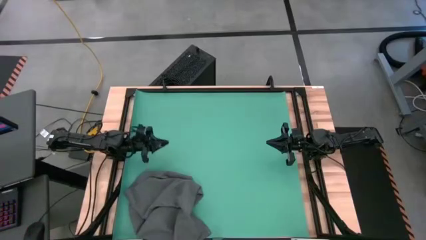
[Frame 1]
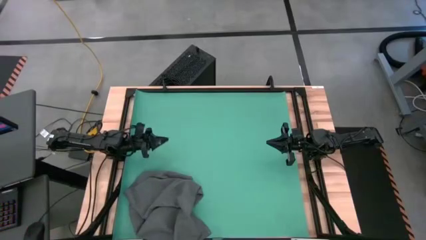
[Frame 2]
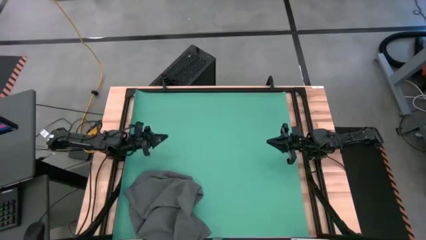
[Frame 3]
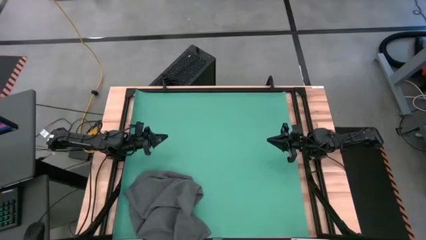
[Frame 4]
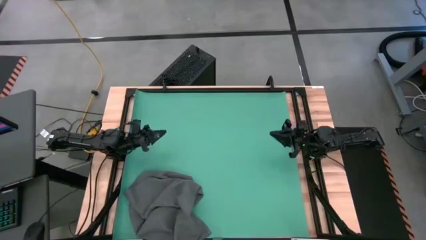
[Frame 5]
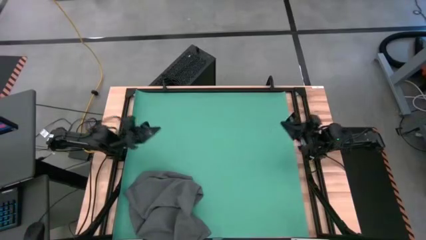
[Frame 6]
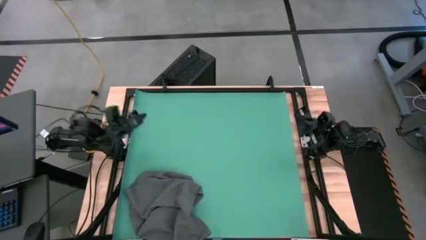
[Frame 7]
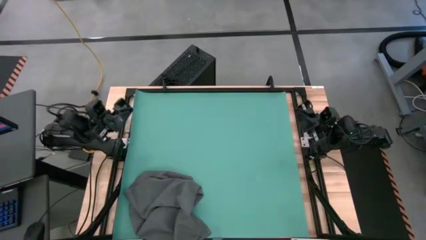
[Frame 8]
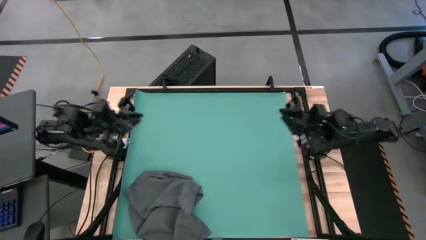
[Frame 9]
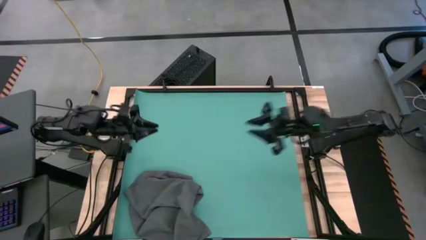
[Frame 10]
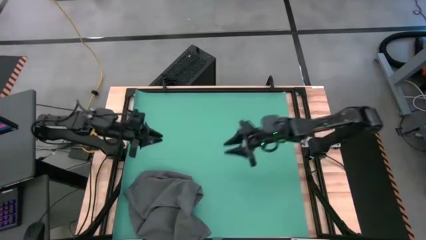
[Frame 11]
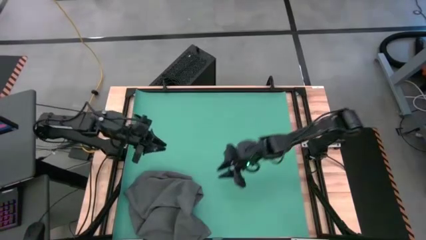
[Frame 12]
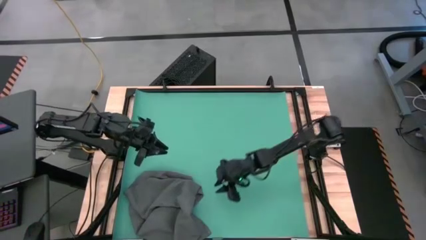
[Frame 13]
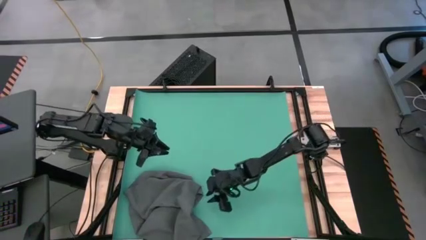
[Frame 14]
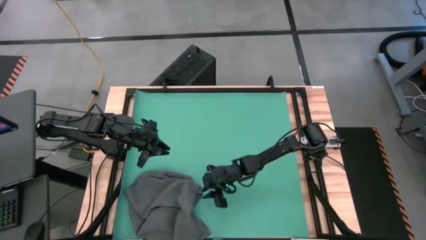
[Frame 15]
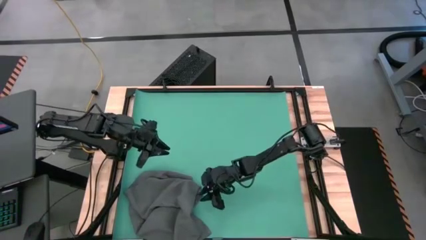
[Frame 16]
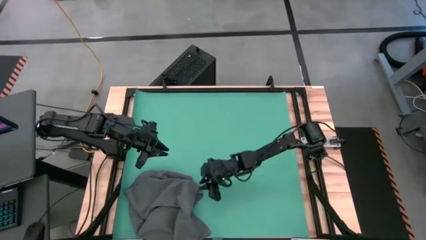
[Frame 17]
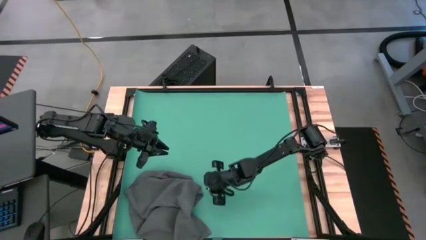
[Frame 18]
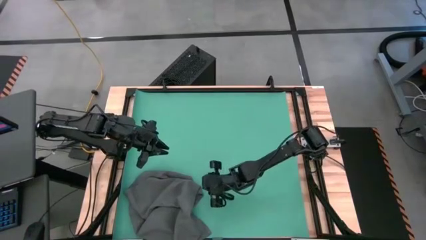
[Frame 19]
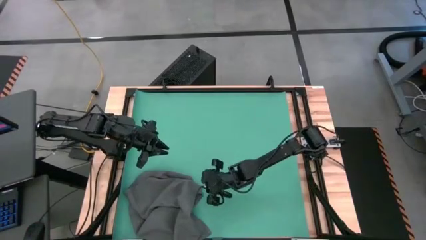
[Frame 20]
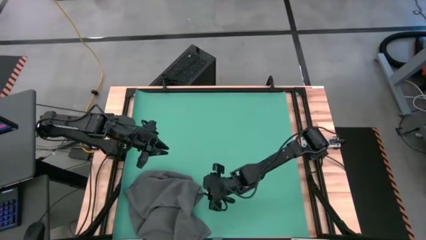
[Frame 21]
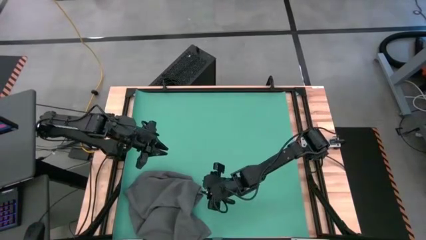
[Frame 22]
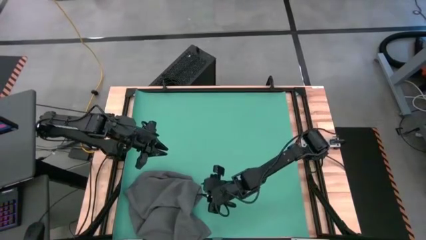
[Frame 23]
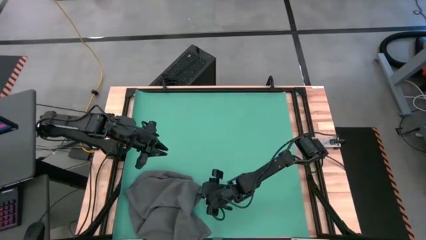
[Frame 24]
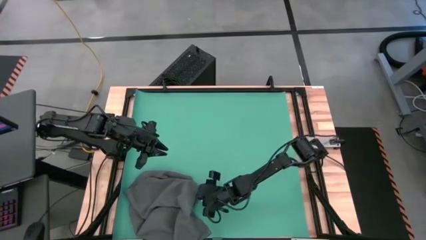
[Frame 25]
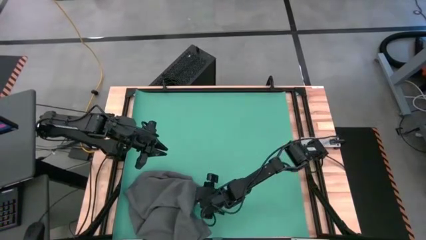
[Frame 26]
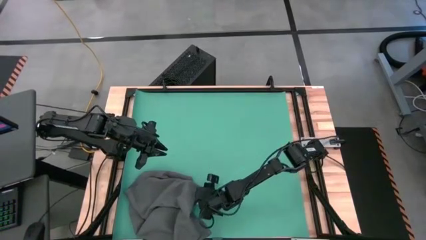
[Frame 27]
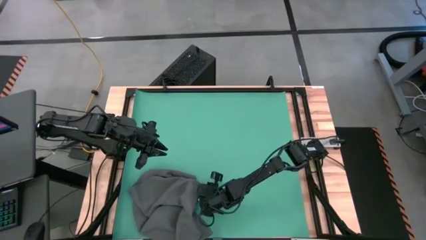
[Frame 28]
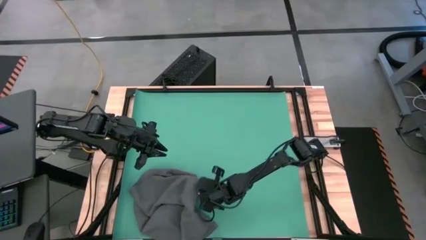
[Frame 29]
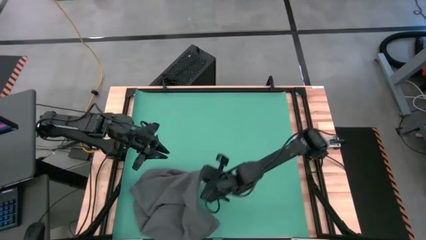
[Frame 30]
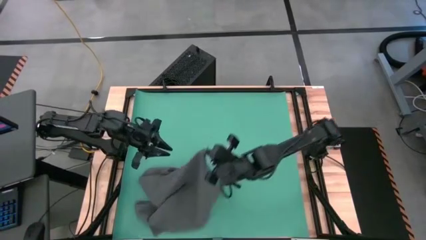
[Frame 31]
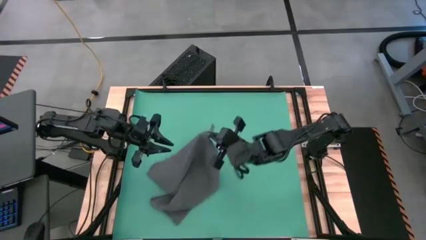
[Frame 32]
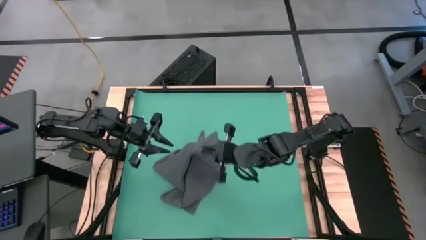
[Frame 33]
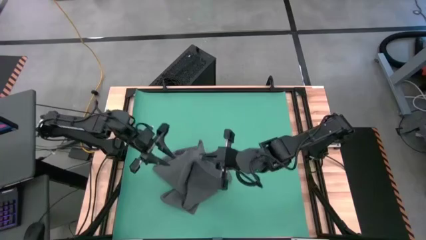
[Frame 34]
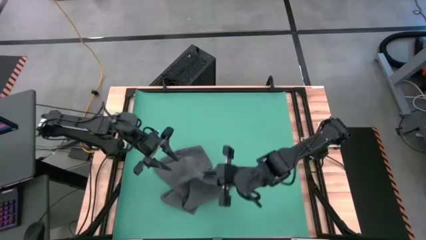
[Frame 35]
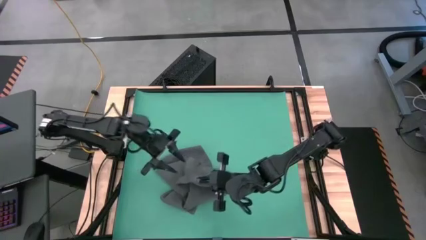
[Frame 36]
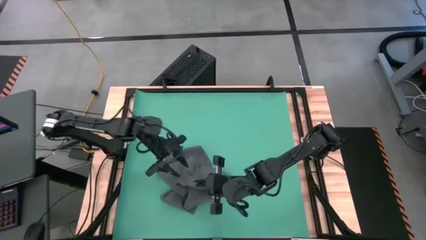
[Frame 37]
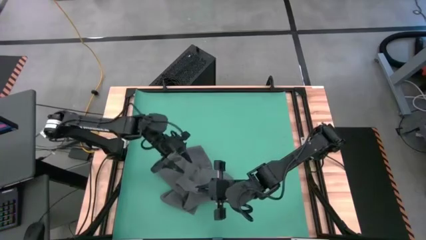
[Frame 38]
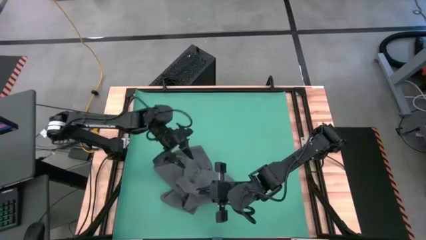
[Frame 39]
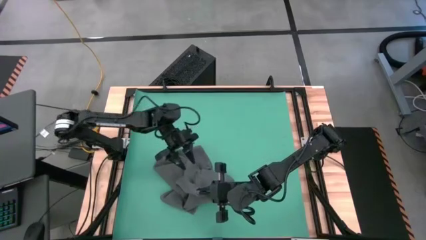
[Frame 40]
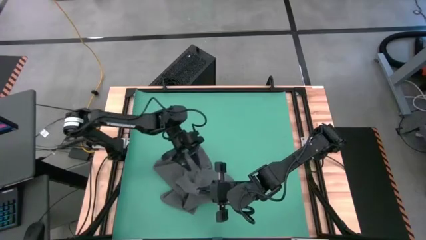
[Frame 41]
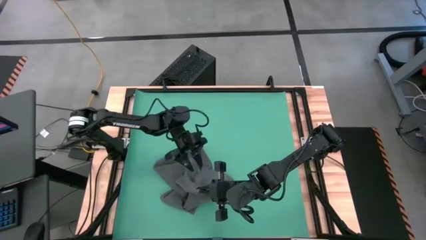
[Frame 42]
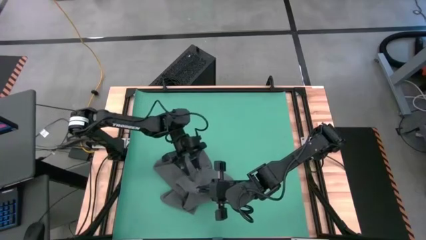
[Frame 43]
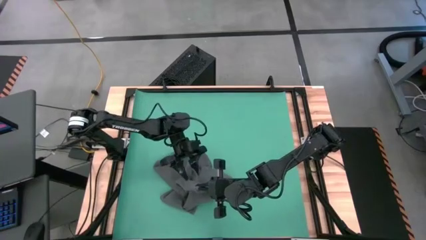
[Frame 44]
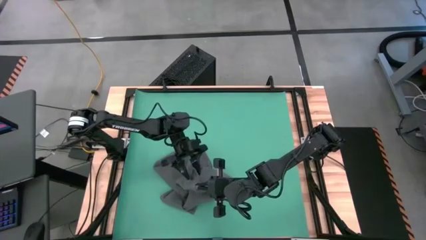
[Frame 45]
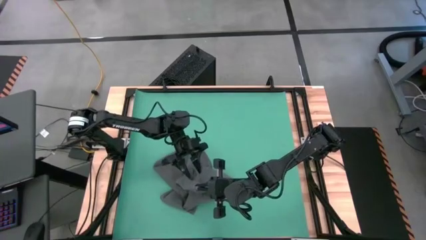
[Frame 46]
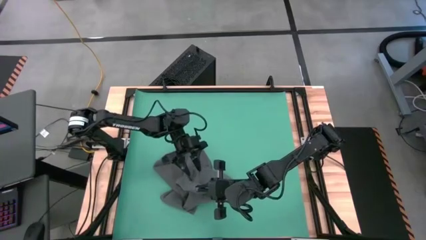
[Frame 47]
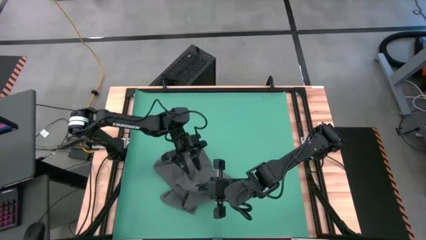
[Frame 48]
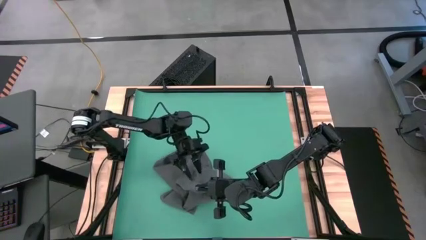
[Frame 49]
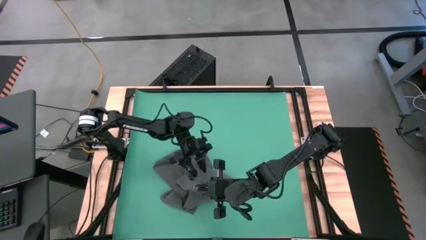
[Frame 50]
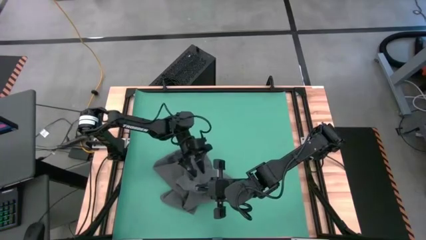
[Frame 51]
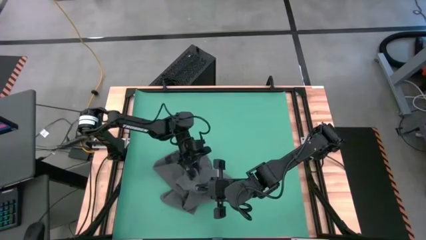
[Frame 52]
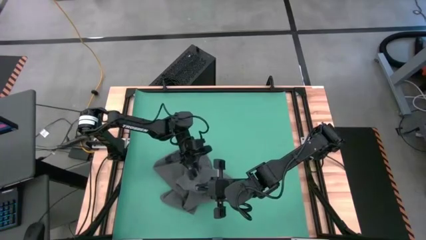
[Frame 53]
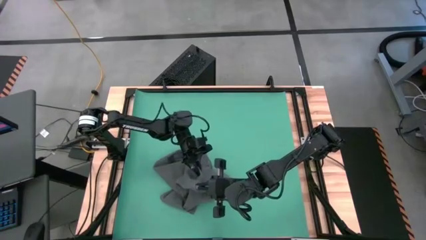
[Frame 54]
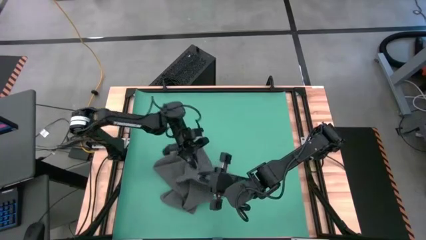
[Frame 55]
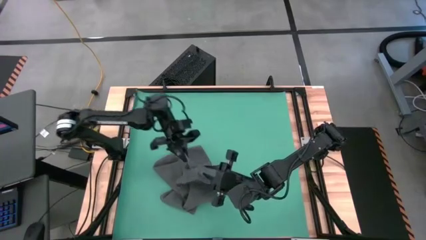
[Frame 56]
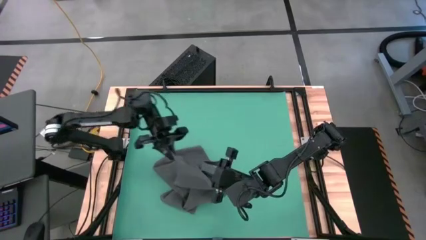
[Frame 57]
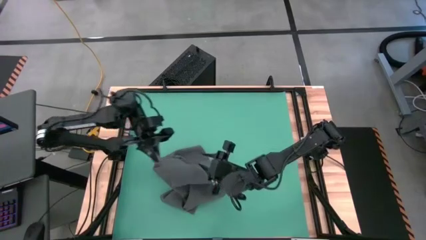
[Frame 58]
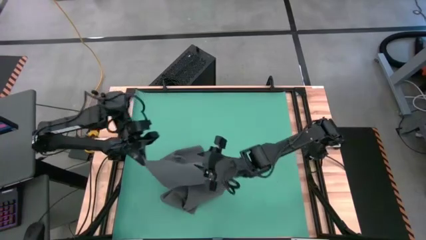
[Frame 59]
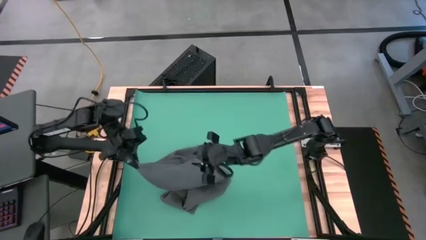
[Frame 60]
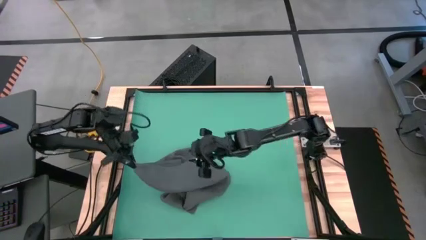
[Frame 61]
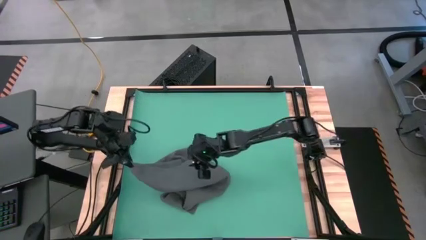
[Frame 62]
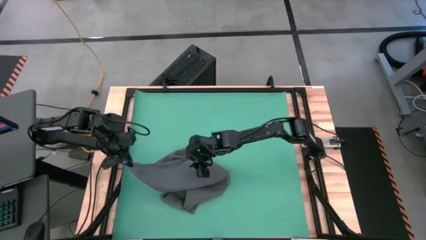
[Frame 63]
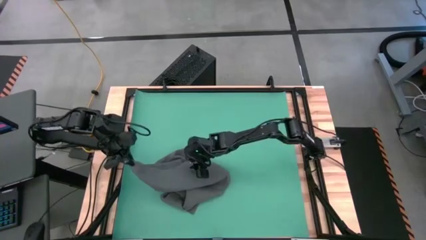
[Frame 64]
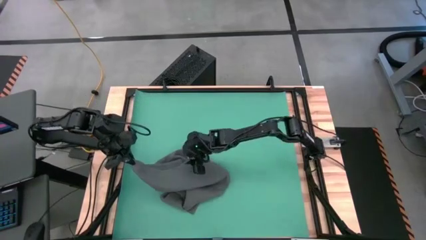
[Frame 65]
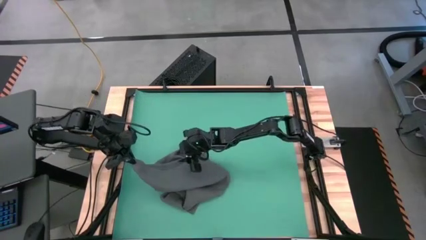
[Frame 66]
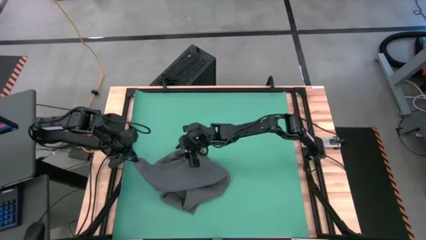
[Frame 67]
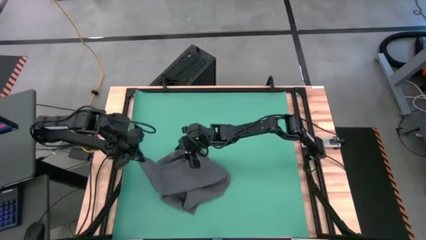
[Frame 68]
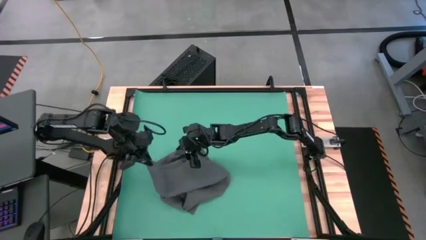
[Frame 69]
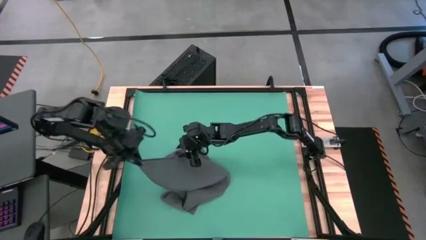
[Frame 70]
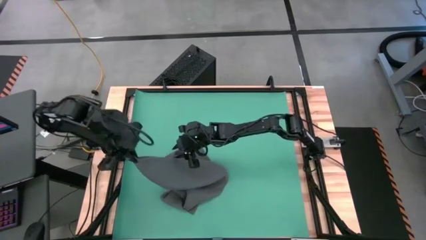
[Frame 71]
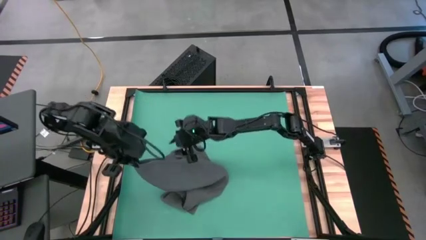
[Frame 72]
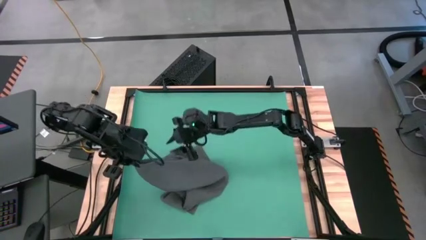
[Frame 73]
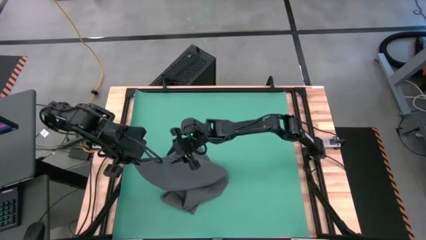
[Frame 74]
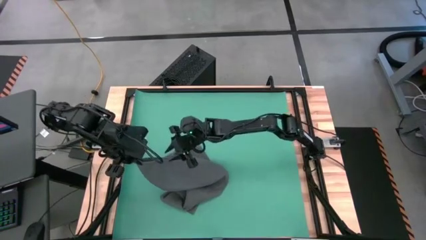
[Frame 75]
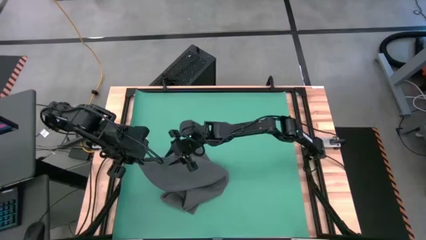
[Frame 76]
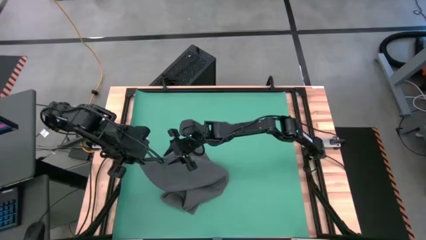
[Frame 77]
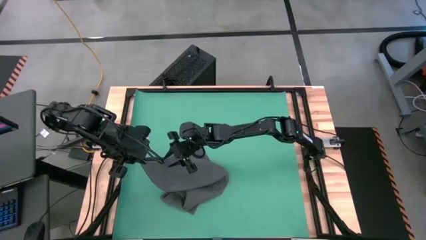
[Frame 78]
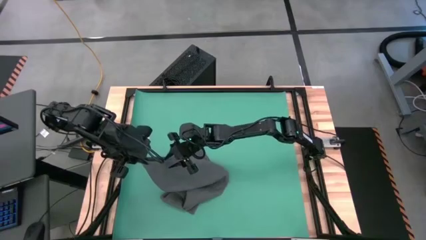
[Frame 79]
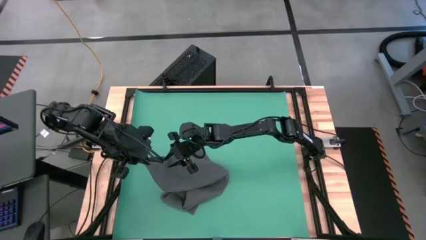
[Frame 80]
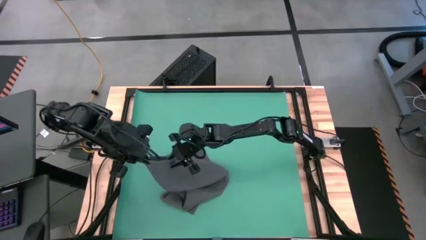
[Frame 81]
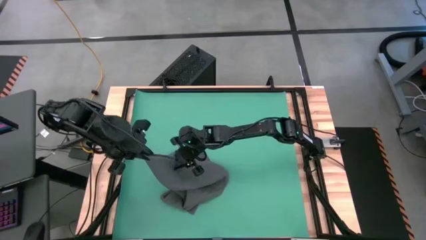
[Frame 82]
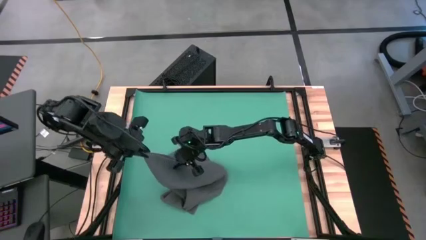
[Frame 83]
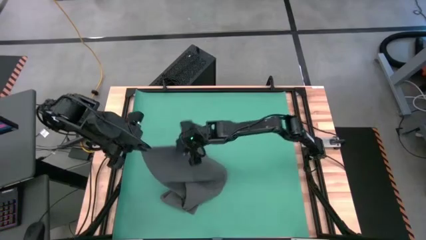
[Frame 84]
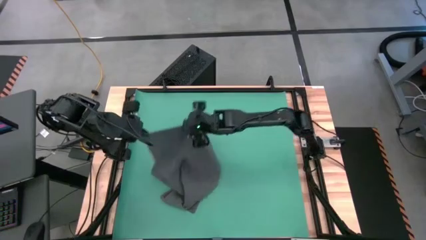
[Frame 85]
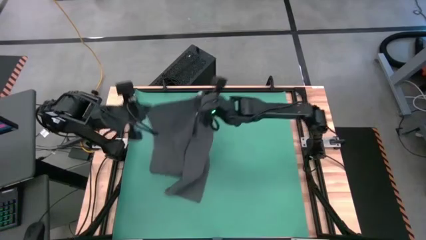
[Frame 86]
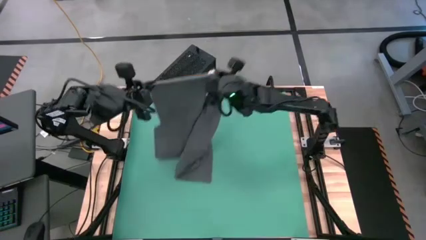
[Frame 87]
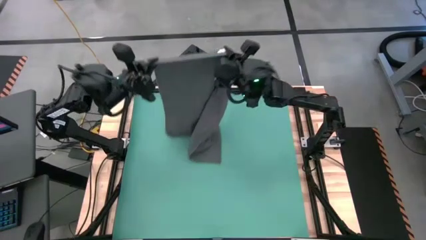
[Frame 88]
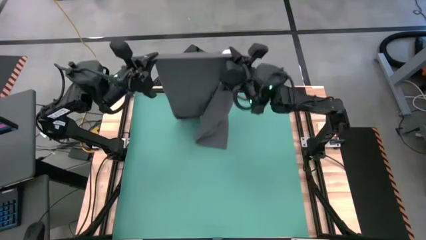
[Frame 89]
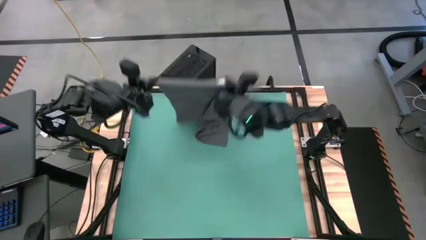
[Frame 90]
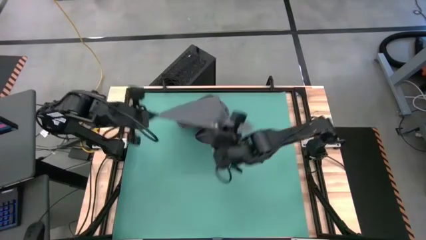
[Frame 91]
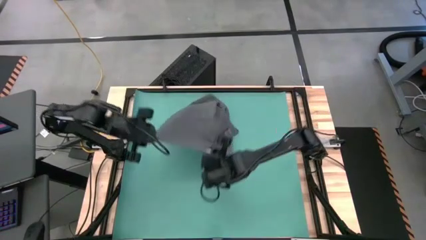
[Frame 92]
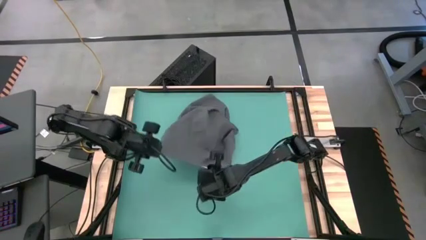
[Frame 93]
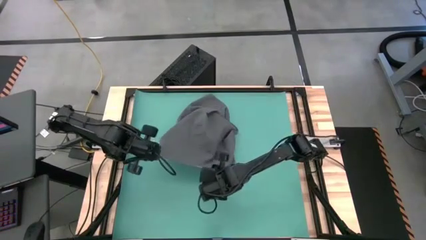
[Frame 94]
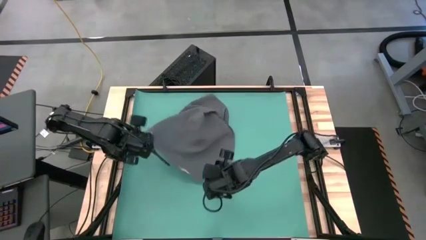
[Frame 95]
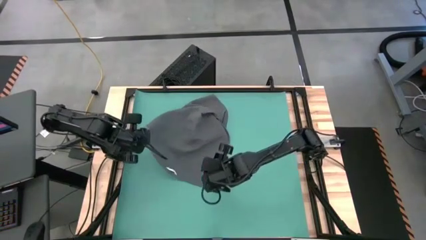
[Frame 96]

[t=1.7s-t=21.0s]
Task: Roll towel
Fold the gray towel
